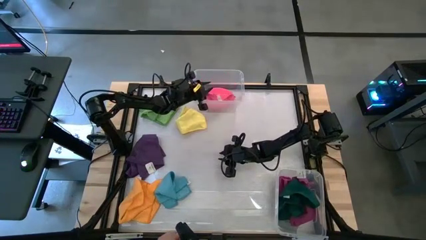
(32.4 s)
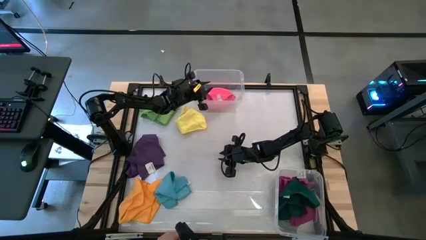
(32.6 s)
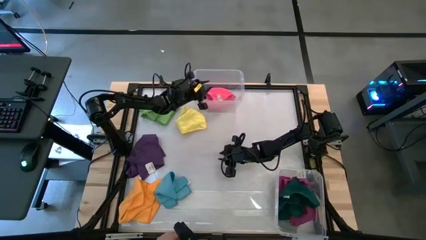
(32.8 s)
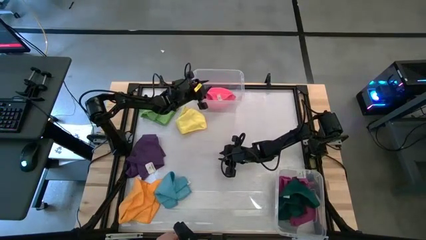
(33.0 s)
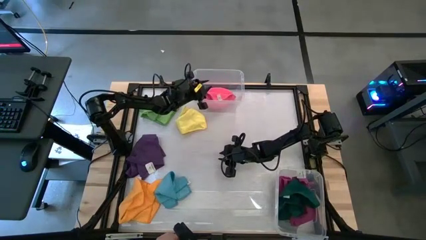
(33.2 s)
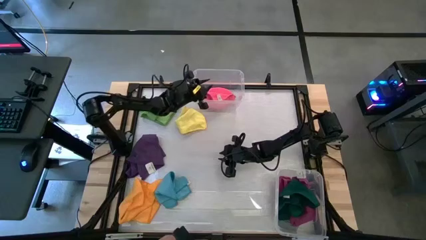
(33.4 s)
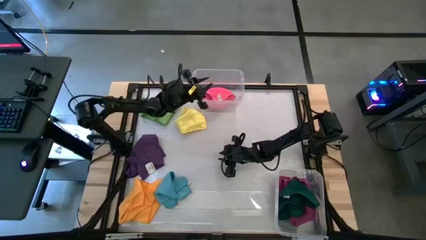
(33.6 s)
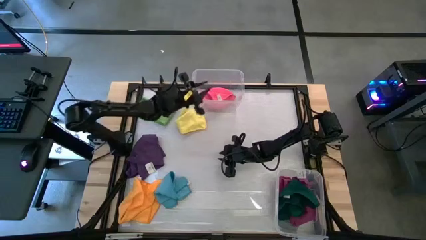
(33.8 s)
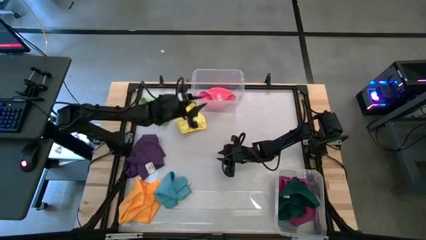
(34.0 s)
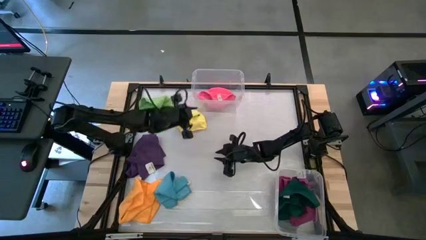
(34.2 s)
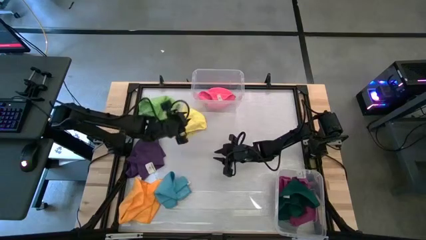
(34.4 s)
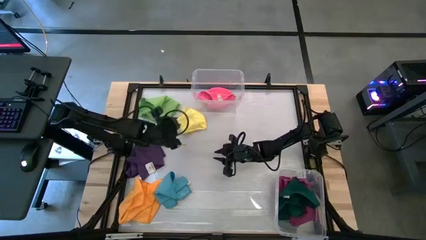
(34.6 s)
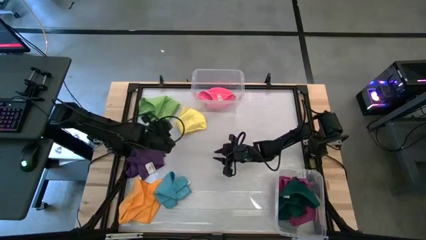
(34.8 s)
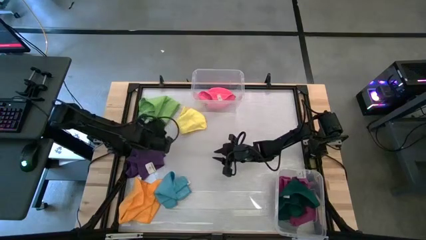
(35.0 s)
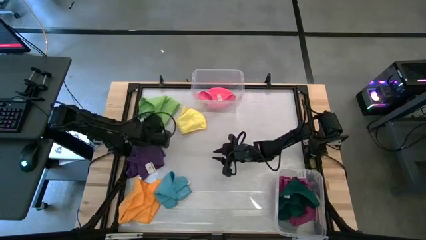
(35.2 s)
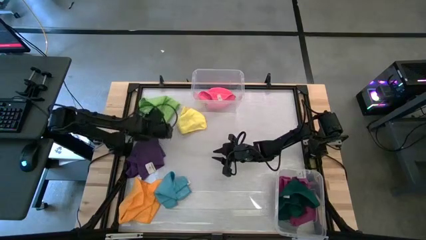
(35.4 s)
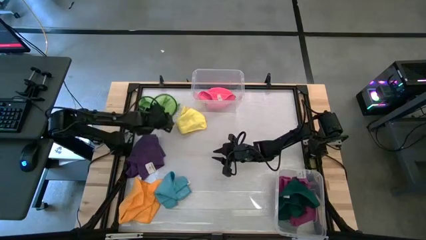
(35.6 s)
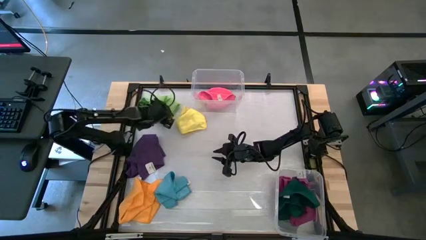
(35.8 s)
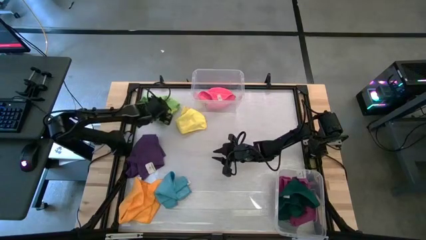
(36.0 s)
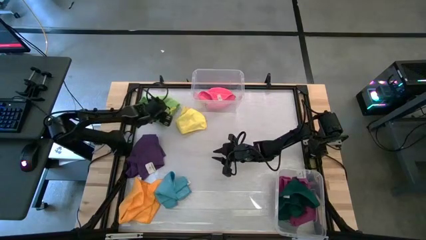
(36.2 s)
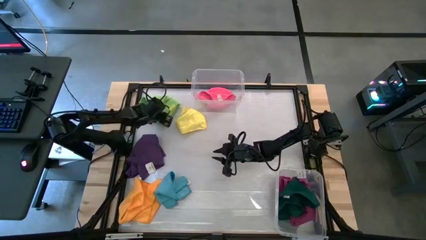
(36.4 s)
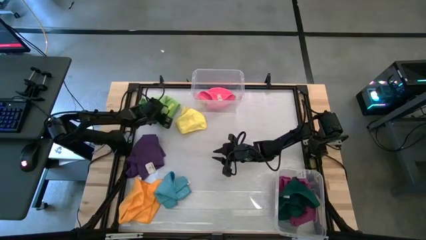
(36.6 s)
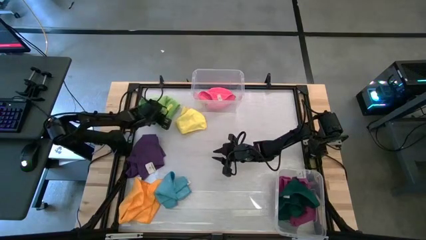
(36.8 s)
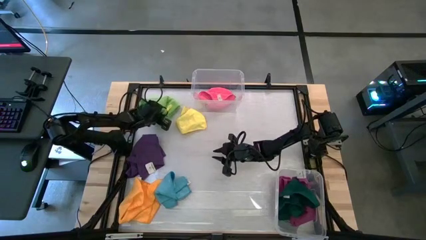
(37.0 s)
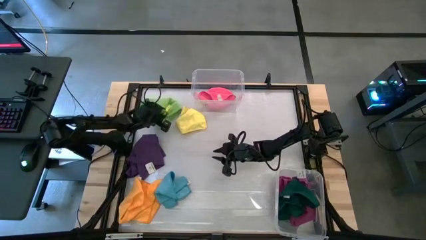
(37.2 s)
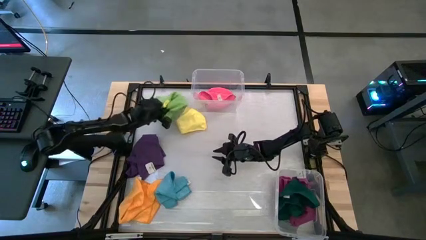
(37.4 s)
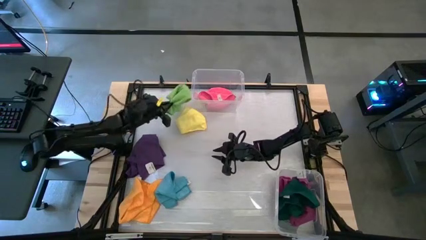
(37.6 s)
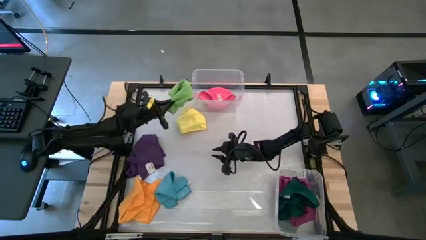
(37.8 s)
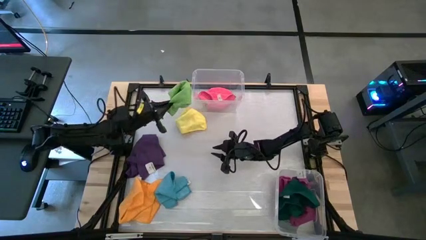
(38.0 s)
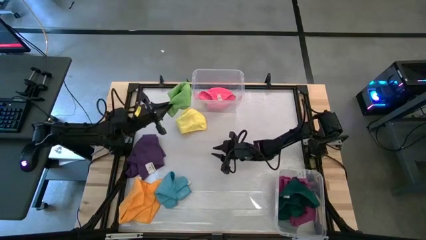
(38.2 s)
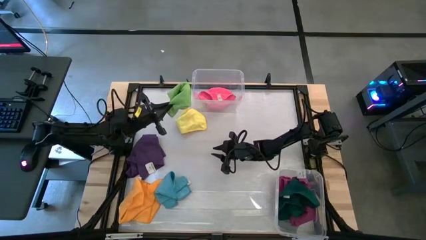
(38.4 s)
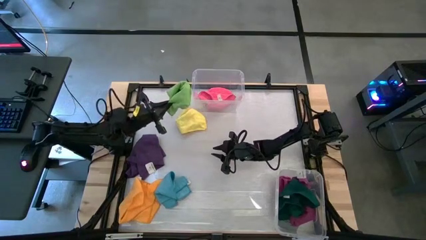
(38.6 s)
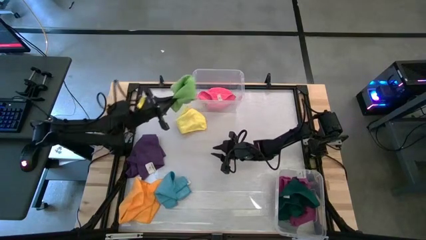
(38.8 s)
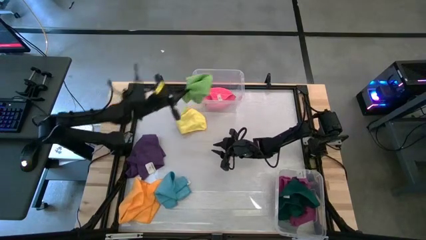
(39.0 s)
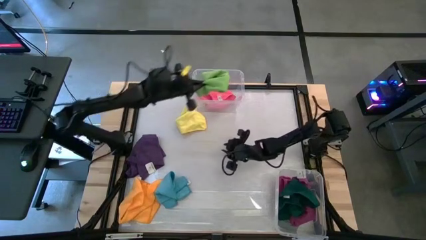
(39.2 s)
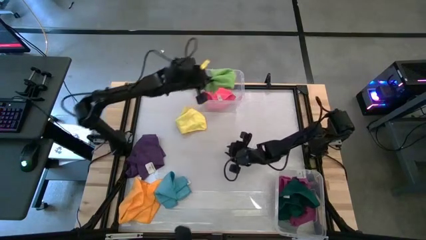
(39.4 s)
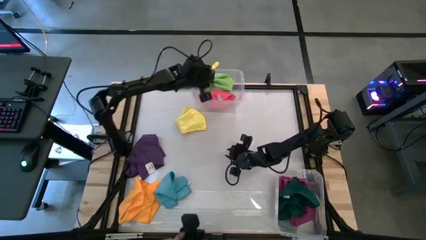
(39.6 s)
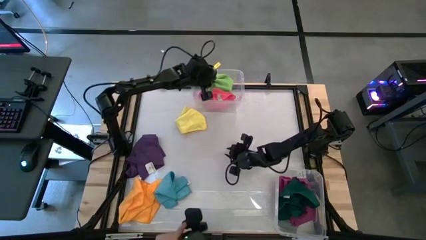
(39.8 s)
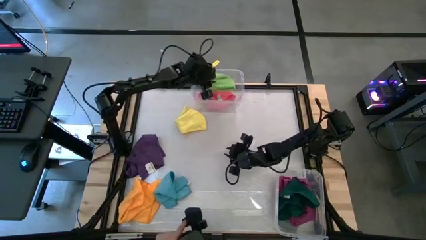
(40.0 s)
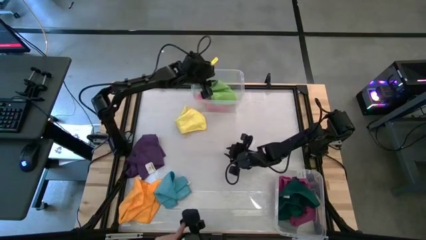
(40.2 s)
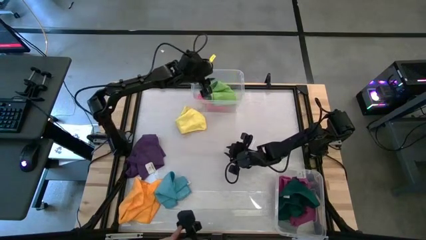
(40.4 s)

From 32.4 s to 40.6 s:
Task: Sort towels by color in basket
Put the light green microfiber cloth into the top transparent bin

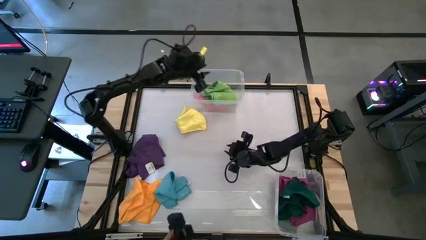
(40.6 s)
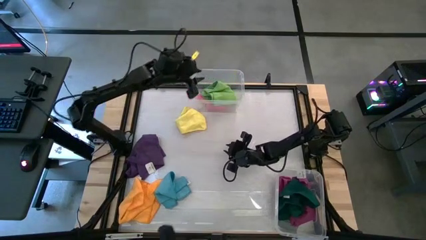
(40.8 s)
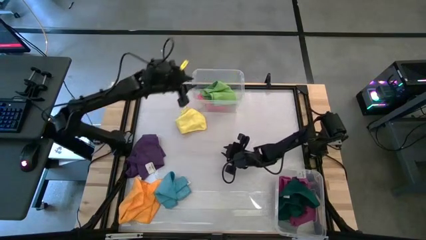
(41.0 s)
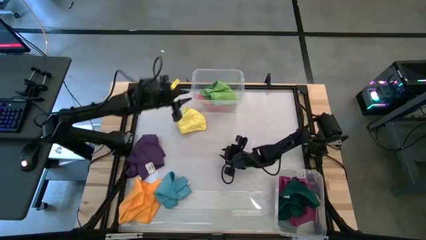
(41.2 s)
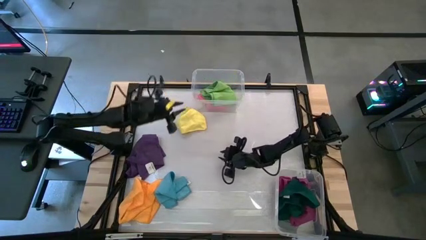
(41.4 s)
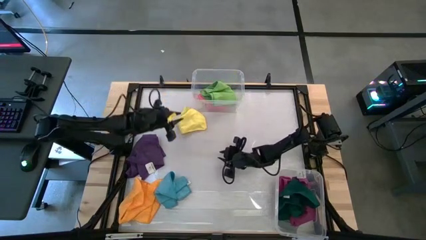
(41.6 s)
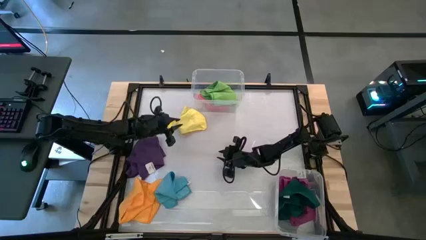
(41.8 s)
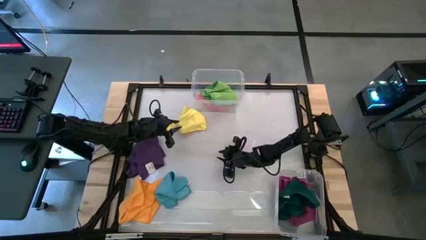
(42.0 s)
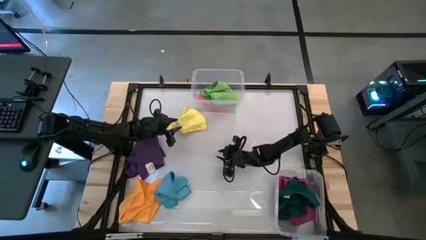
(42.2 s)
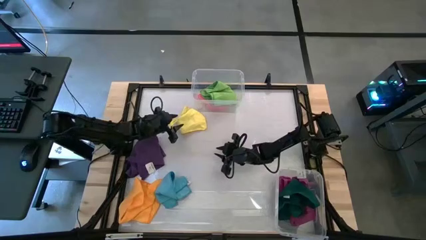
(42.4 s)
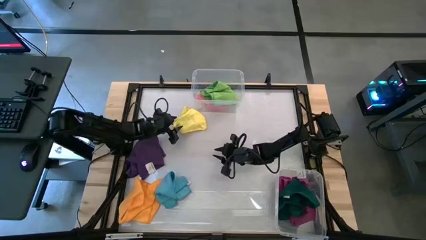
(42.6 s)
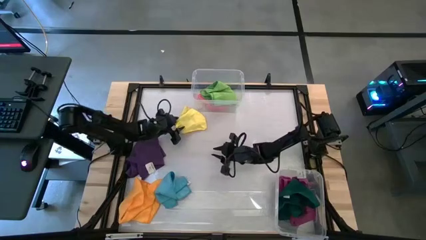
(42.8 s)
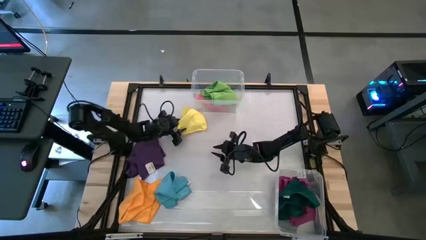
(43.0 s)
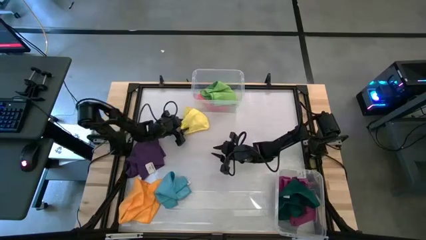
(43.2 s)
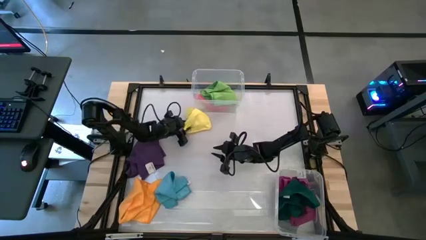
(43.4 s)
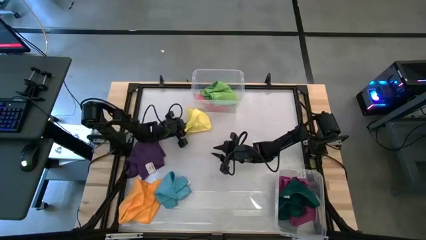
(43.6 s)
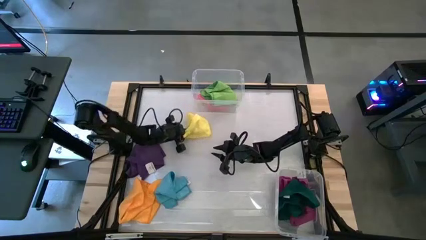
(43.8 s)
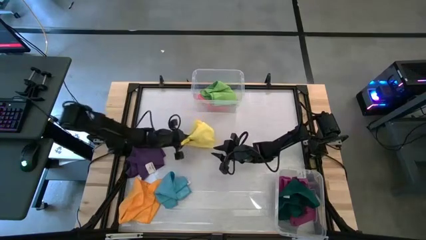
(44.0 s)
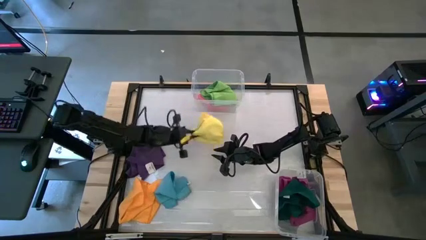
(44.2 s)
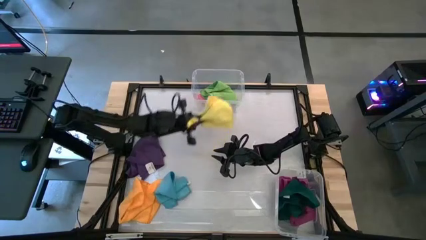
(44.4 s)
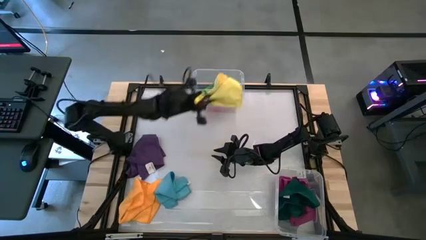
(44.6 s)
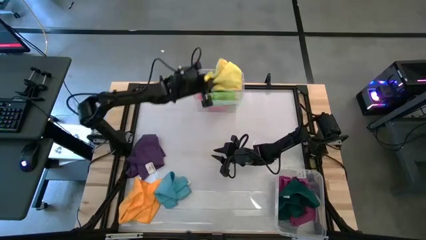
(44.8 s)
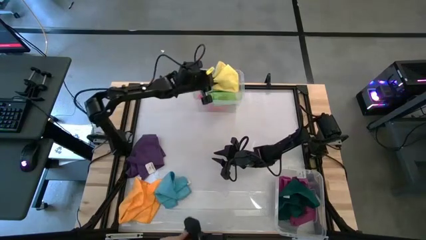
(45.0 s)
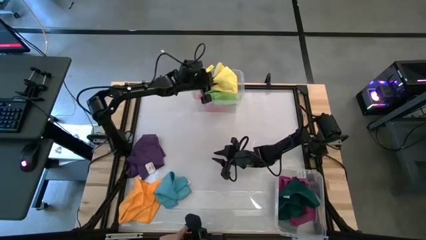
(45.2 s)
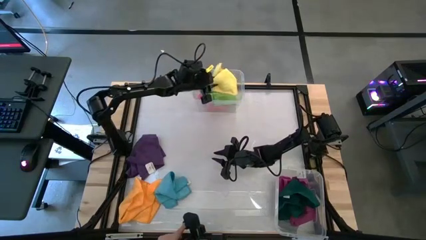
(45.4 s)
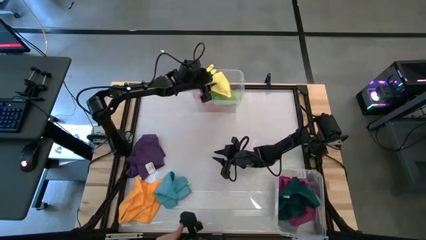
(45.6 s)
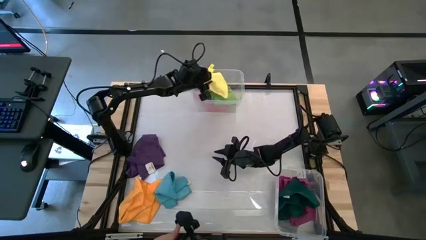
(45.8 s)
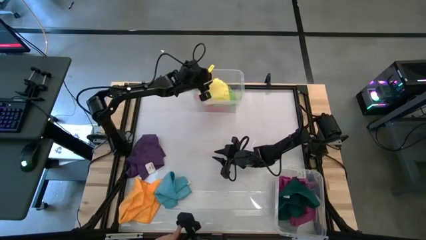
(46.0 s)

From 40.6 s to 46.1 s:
Put the yellow microfiber cloth into the top transparent bin
